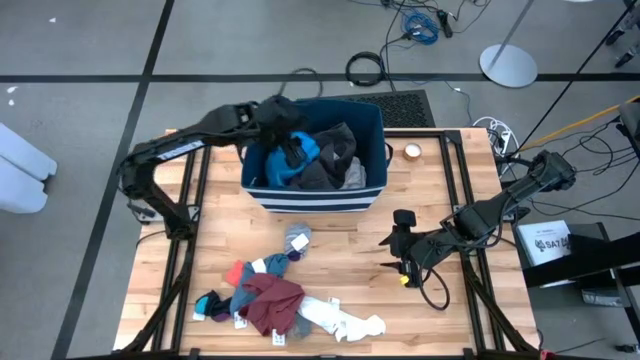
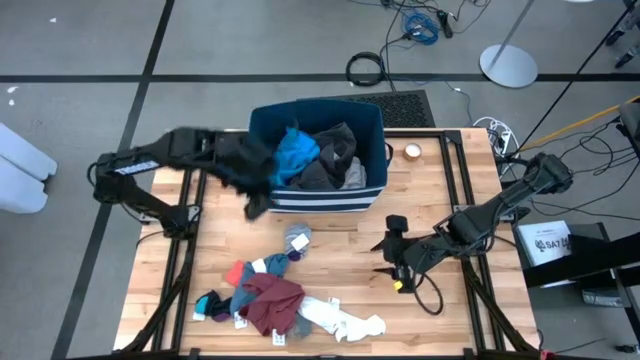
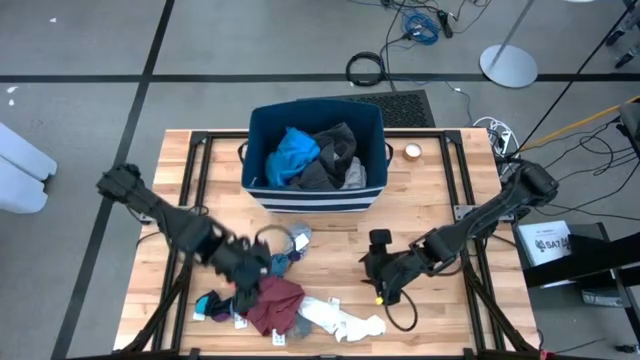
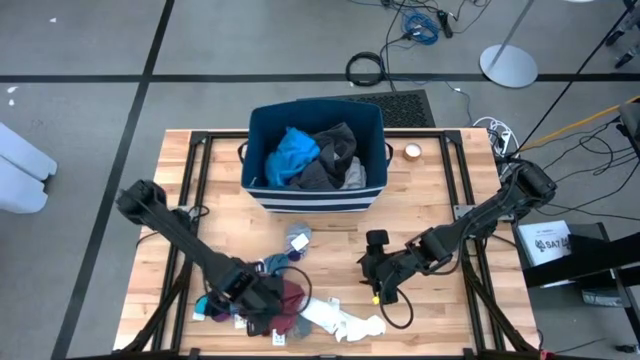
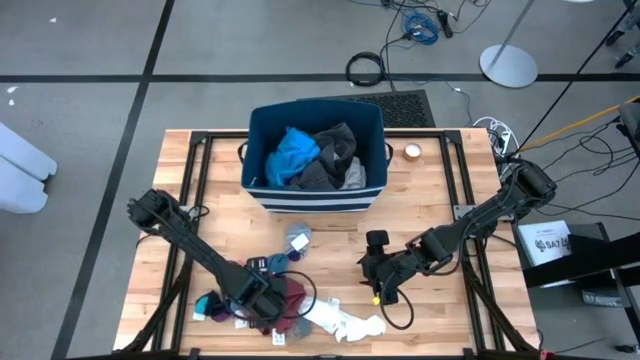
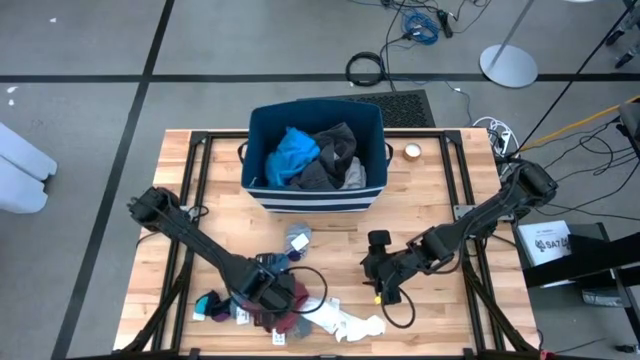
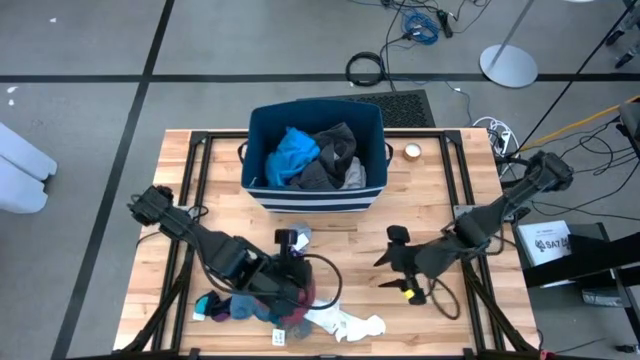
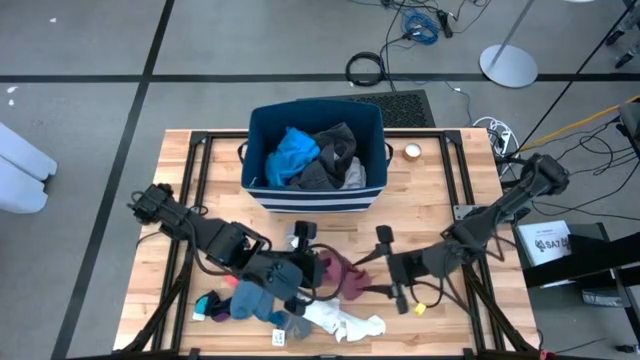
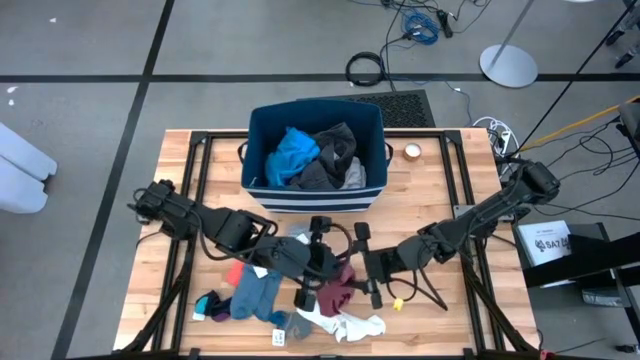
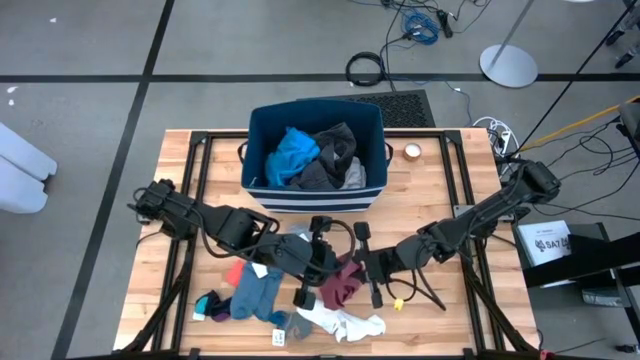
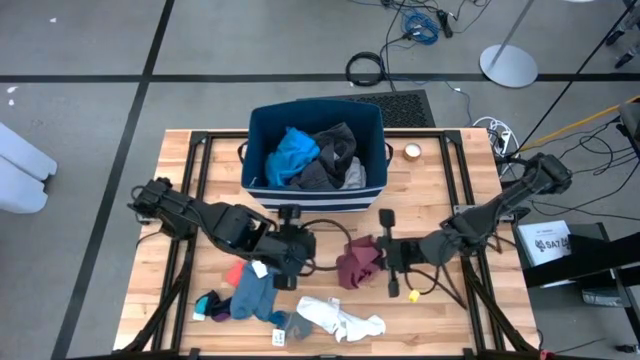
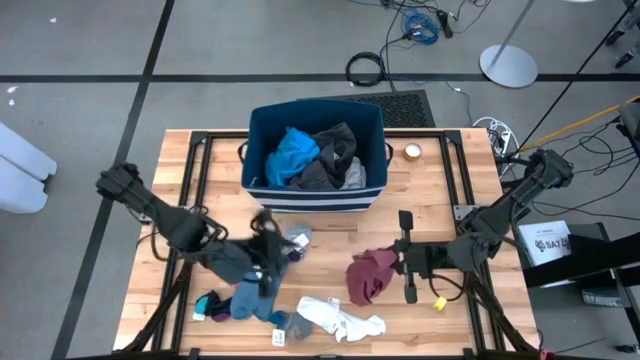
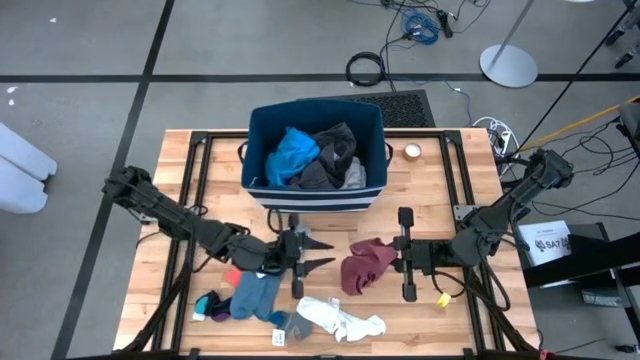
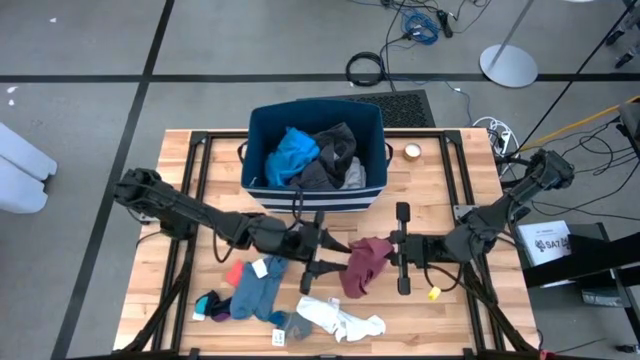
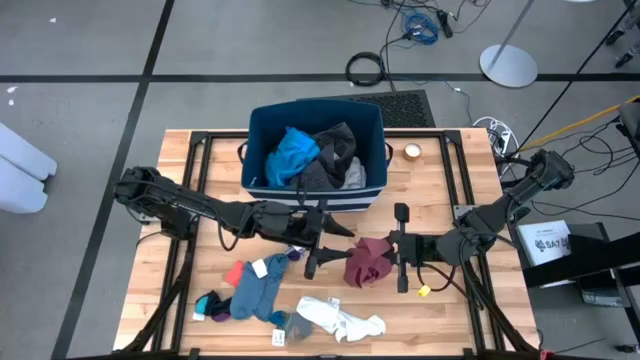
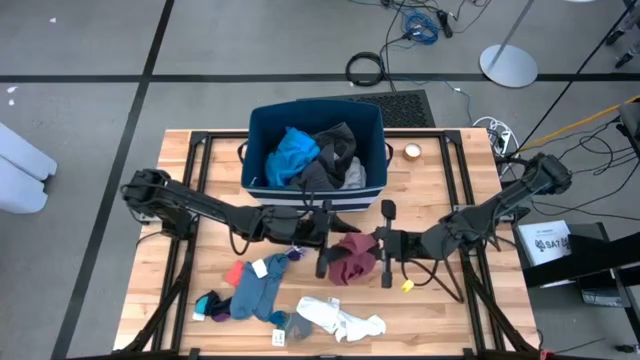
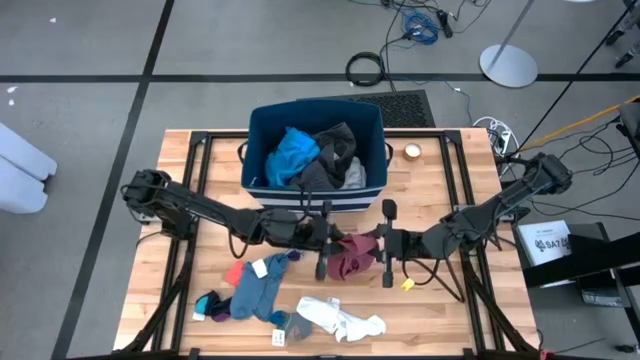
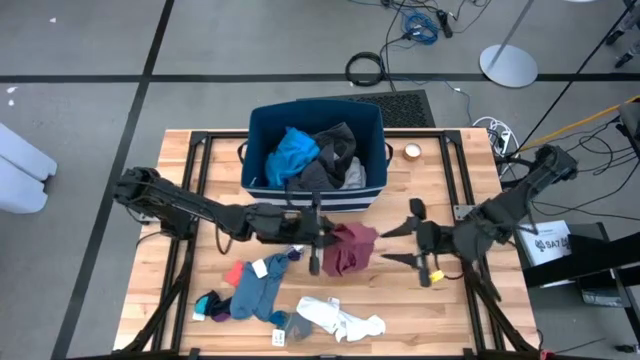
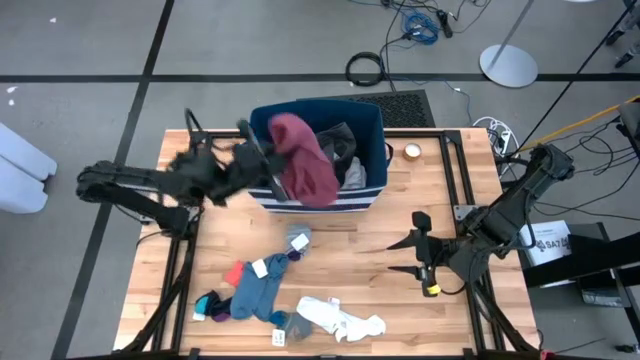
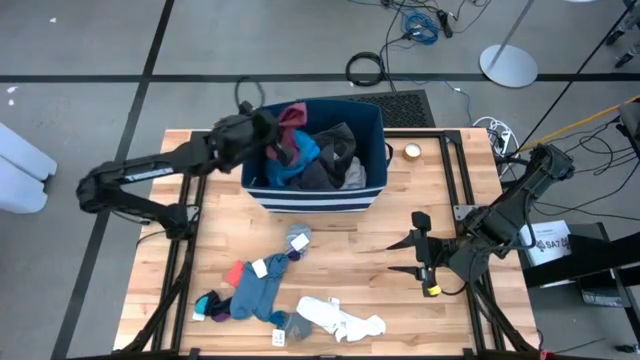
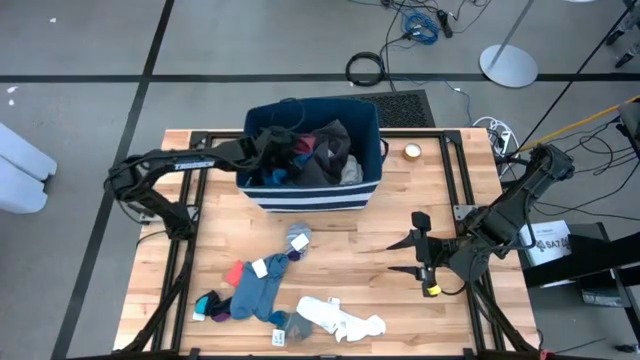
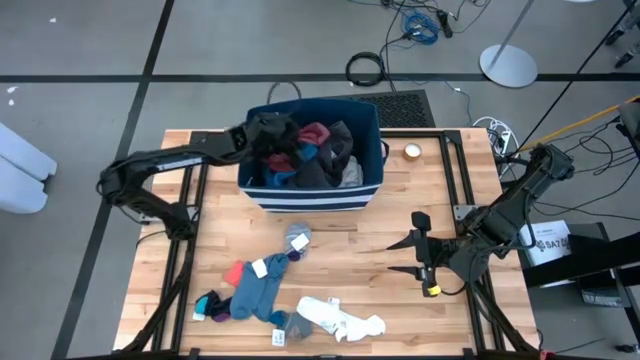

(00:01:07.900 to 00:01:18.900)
Task: Sort clothes
Put the pink underwear into the blue bin

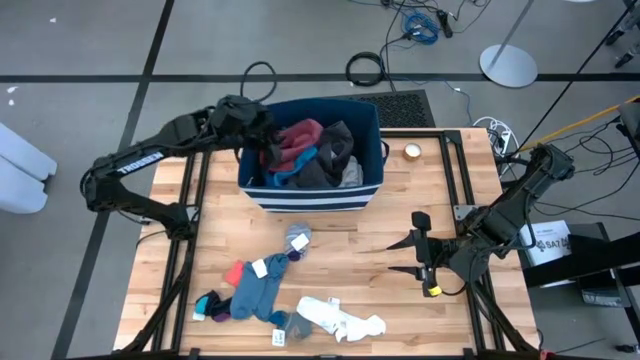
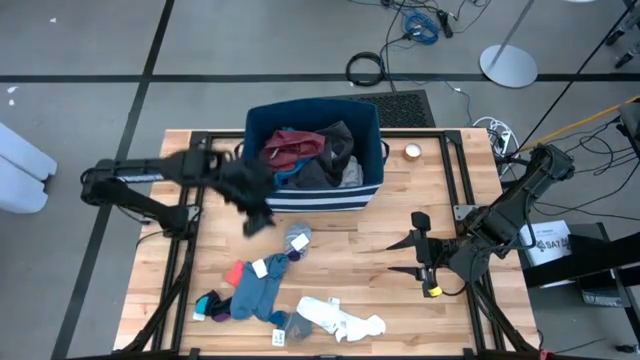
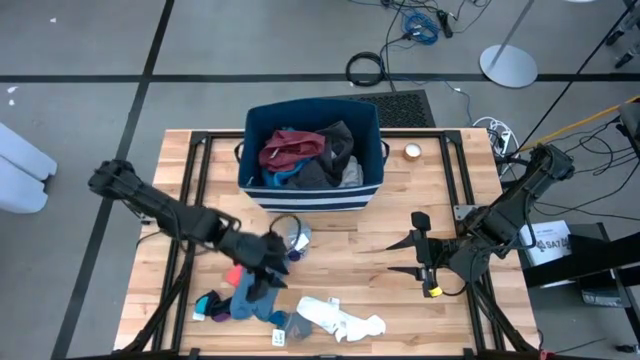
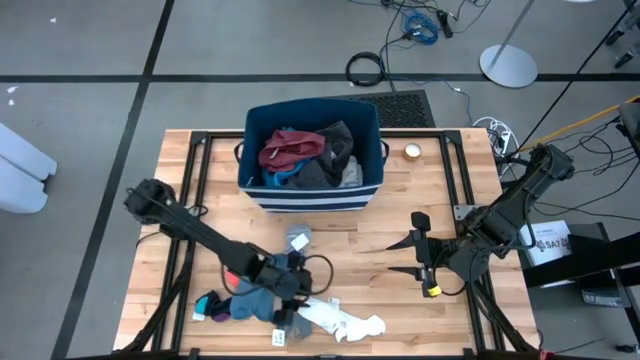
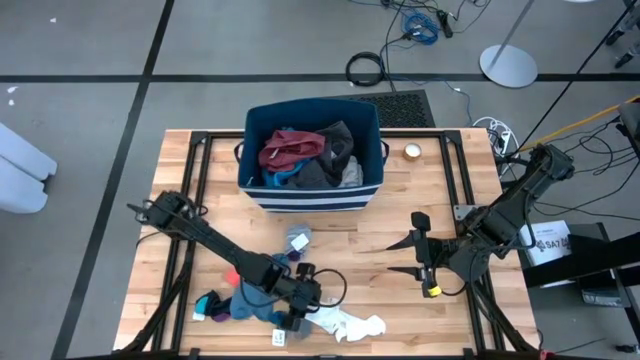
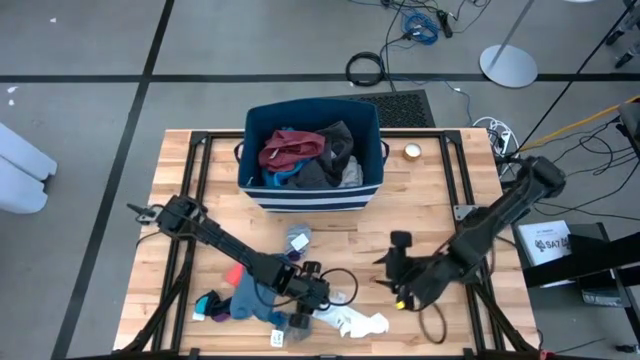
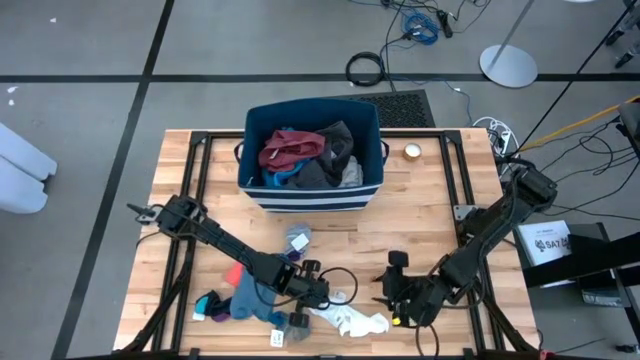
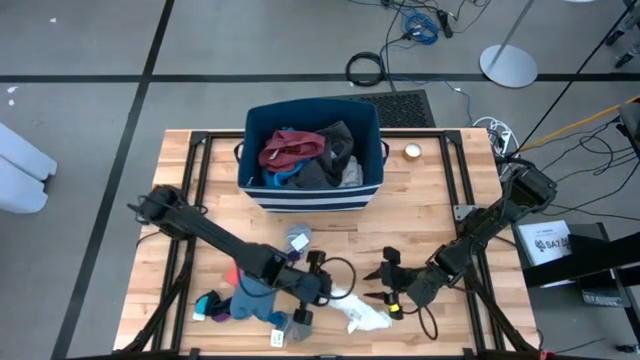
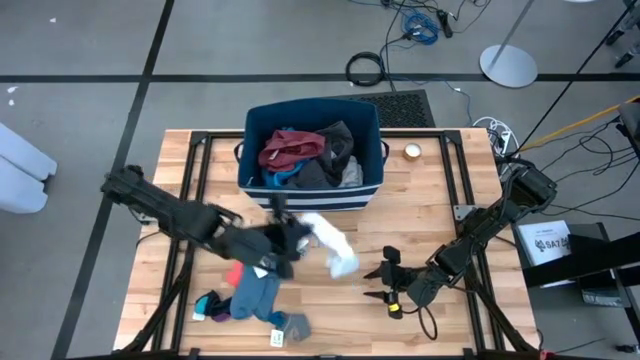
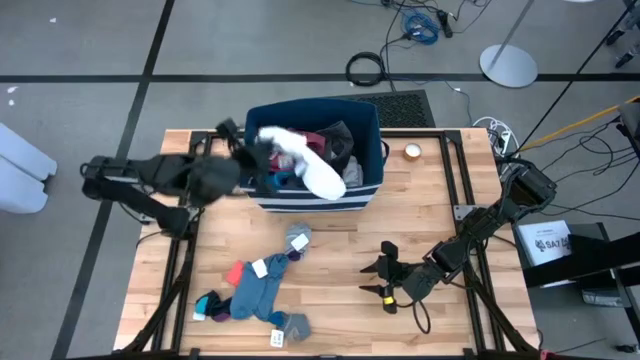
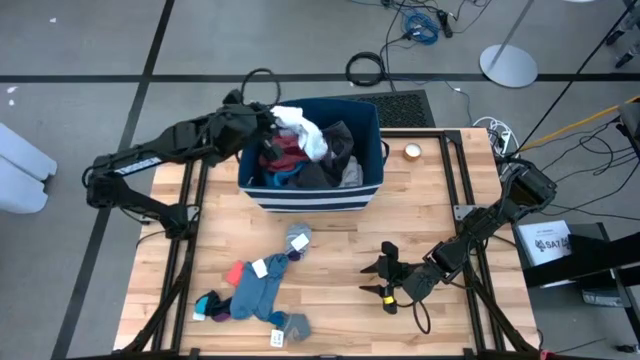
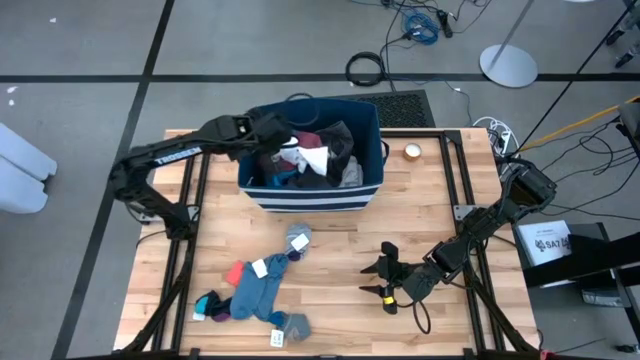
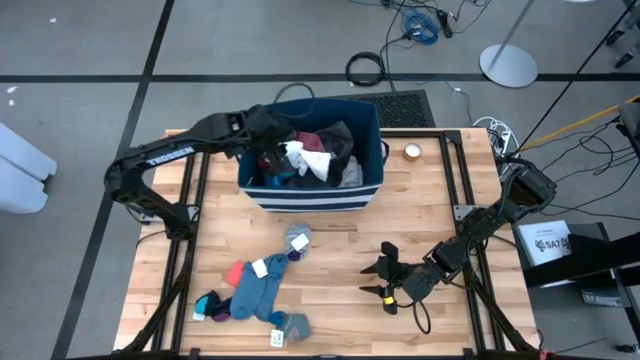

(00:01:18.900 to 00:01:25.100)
Put the white sock into the blue bin

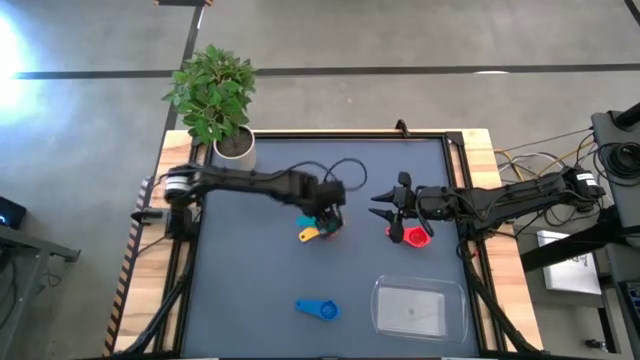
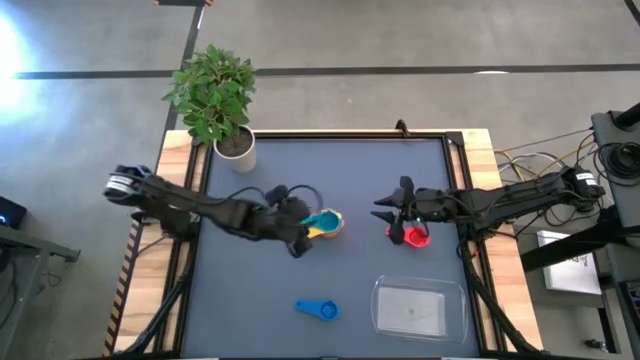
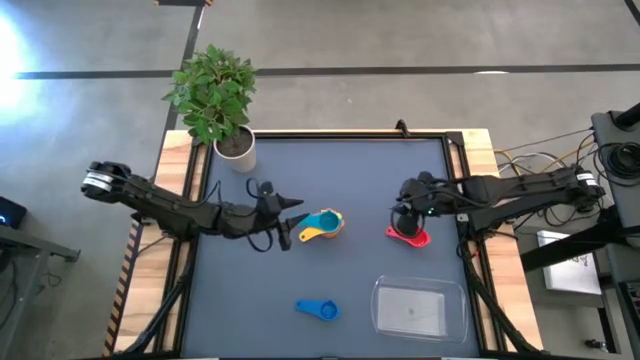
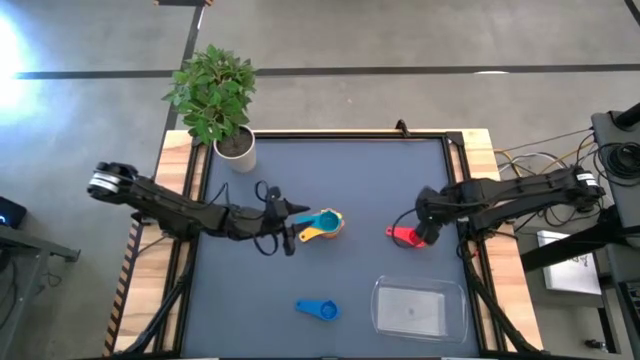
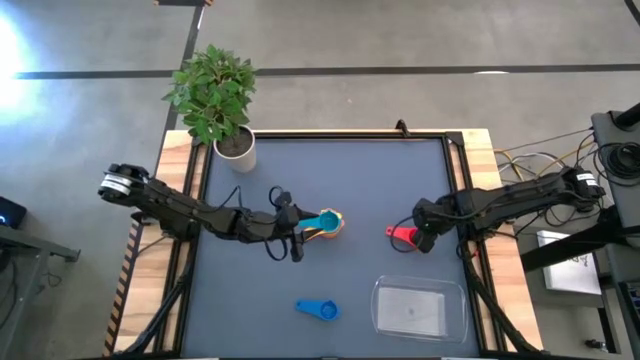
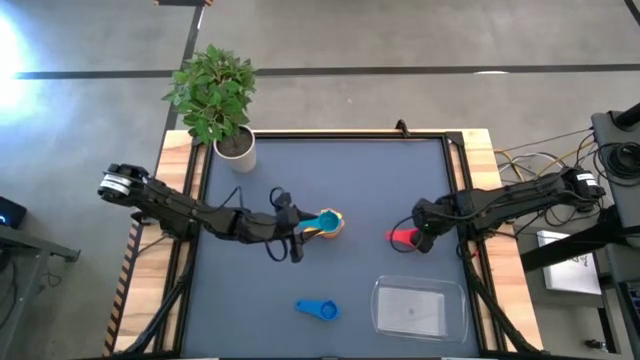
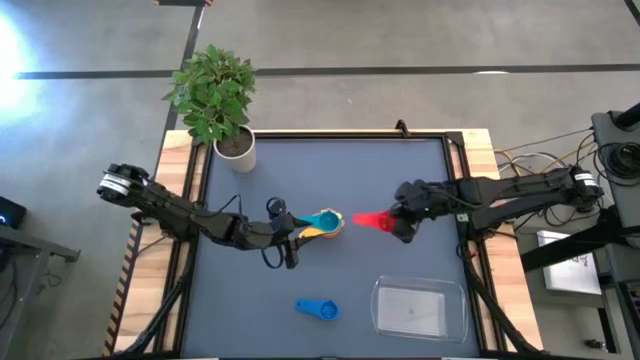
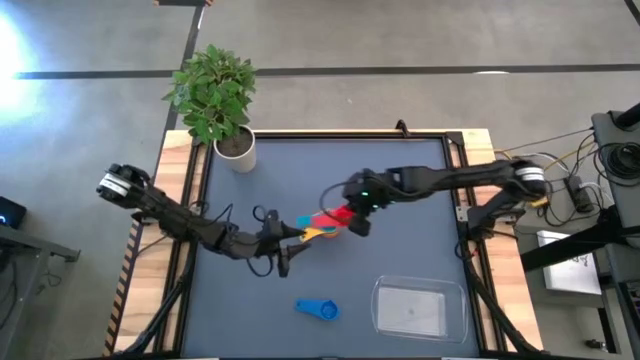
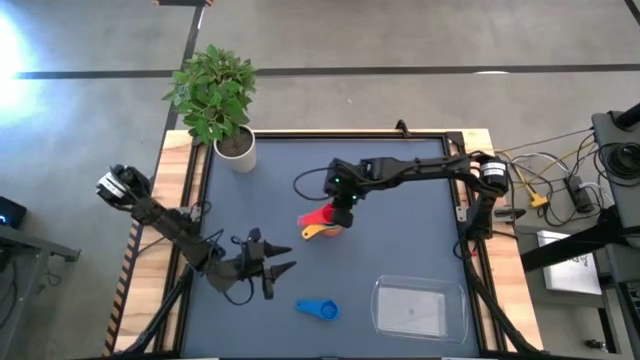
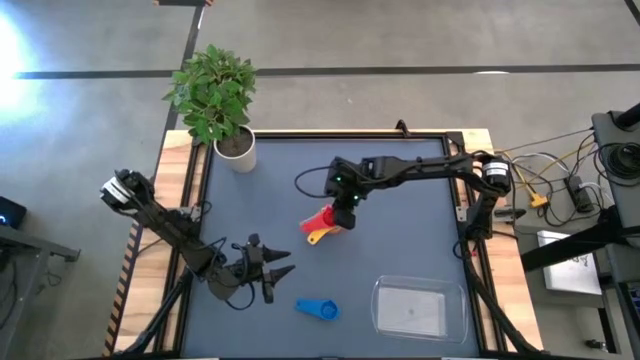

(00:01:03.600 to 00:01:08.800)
Task: Nest measuring cups in basket
Stack the red measuring cup on top of the light blue measuring cup
